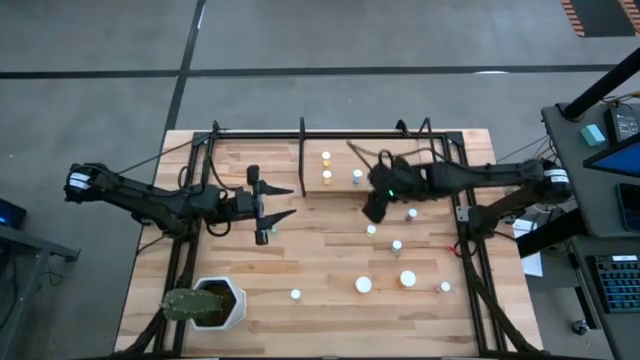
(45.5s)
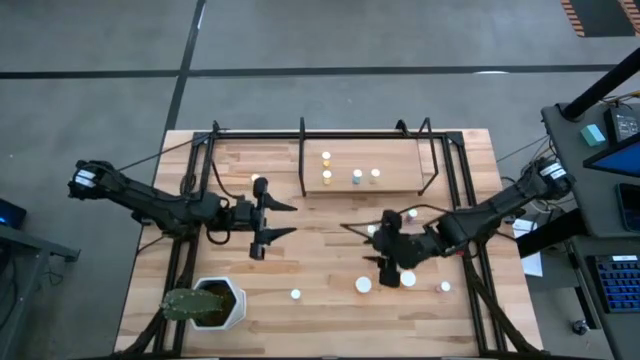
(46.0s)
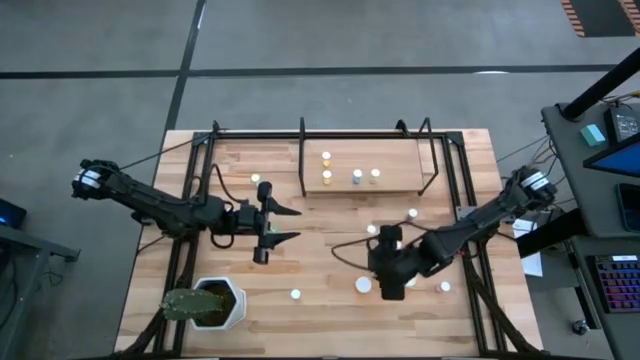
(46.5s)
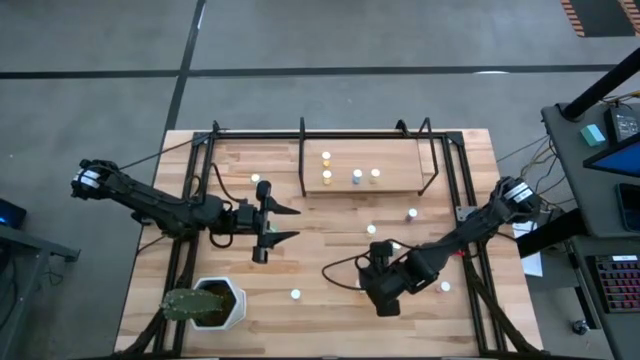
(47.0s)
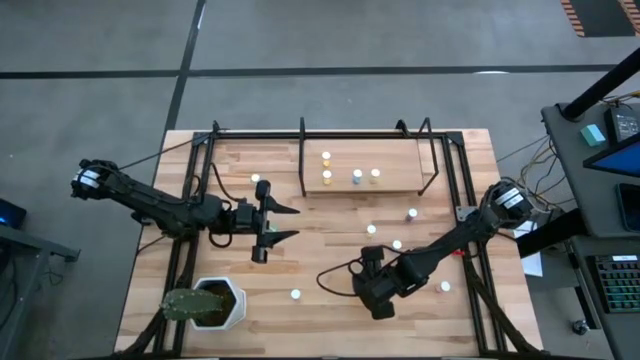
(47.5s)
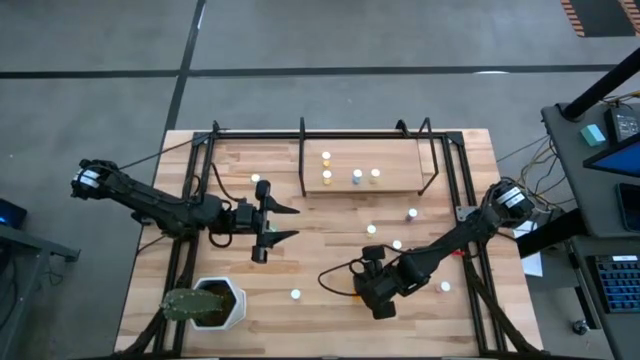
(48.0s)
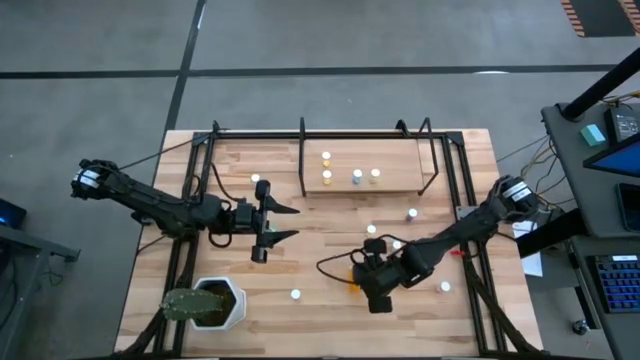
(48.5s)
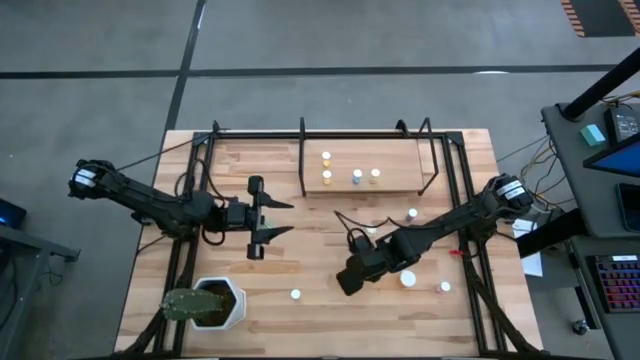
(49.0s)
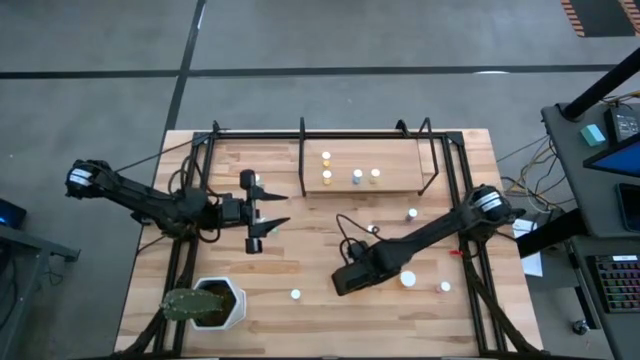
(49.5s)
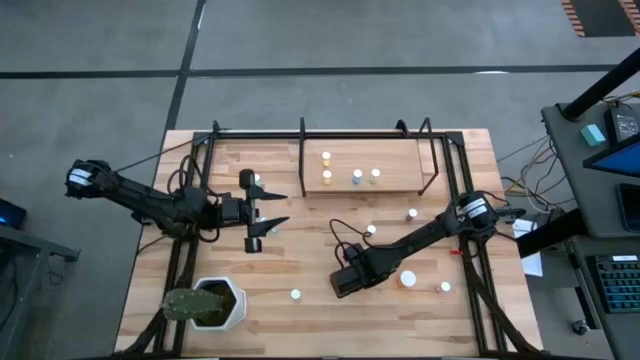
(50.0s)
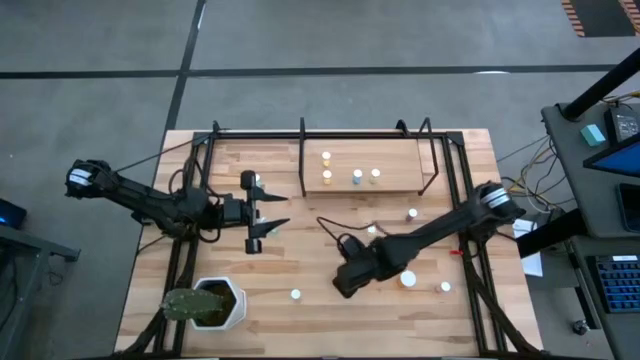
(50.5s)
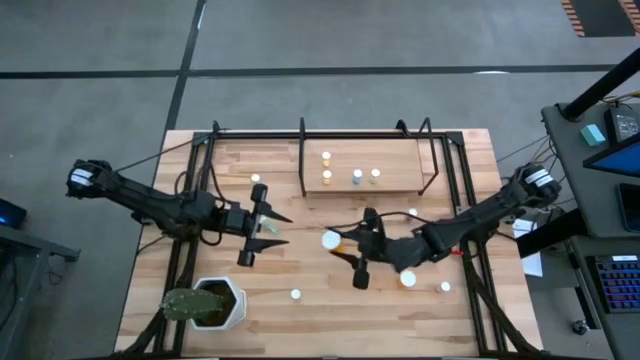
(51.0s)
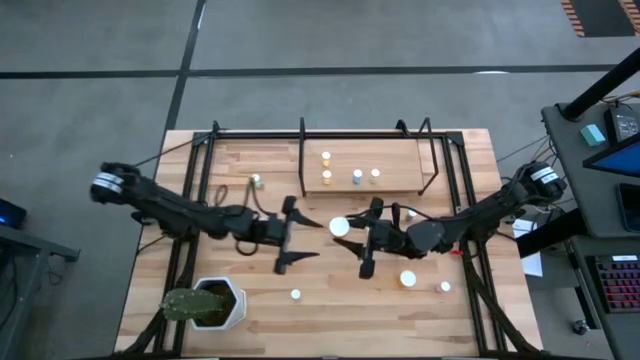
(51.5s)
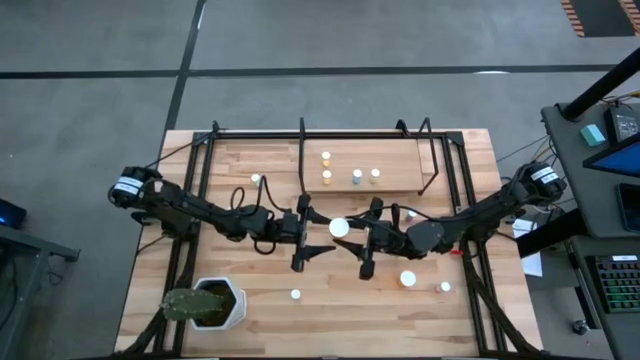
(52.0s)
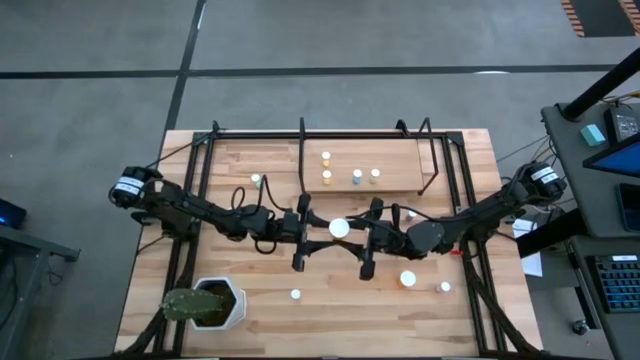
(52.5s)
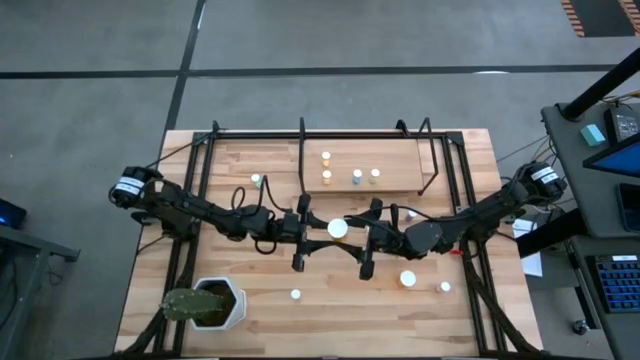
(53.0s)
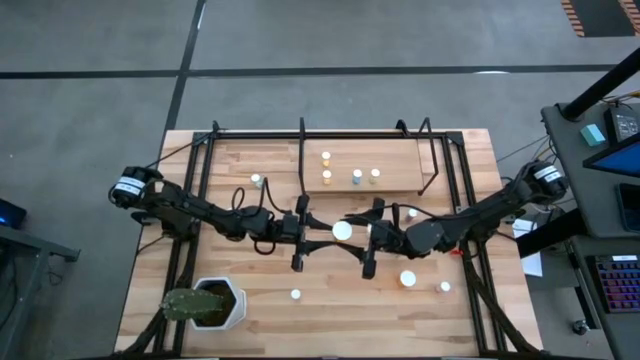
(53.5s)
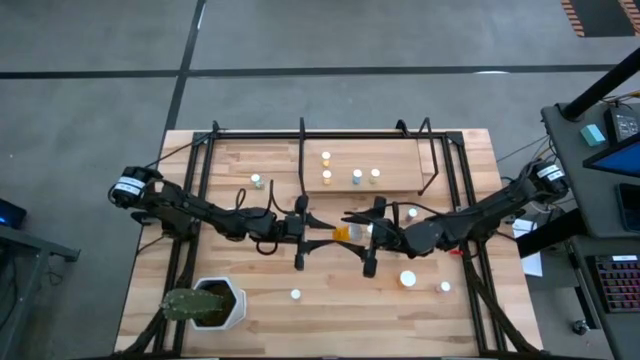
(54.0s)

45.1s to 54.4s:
Task: Pick and place medicine bottles onto shelf by color
Put the orange pill bottle on the shelf

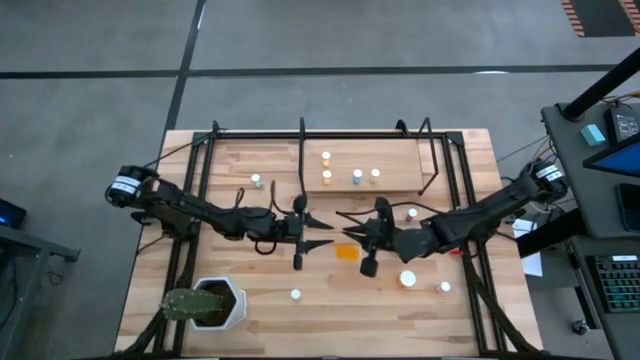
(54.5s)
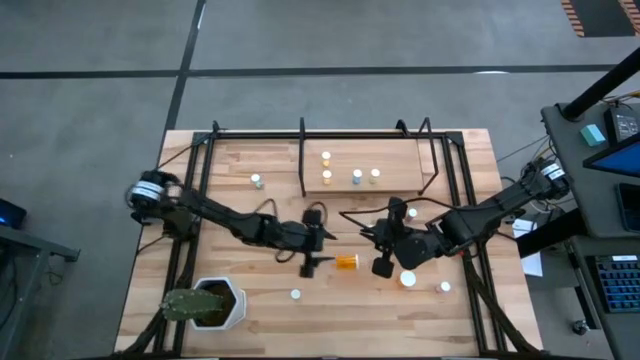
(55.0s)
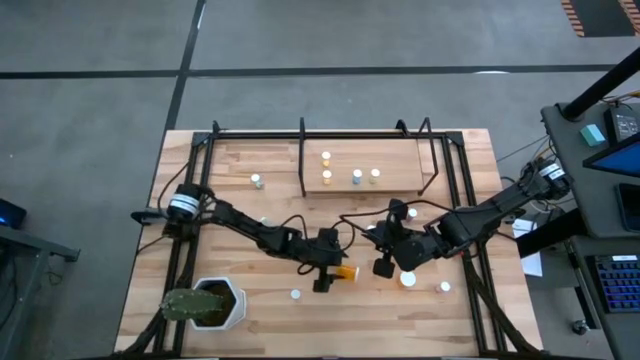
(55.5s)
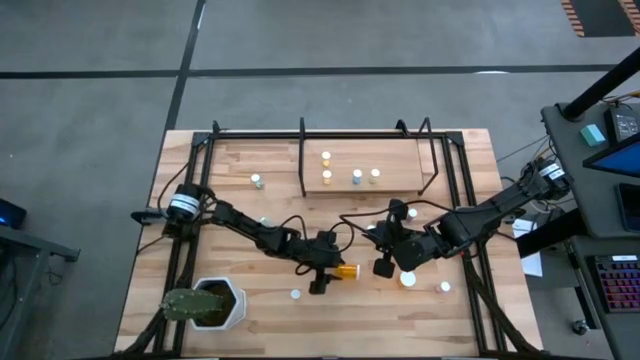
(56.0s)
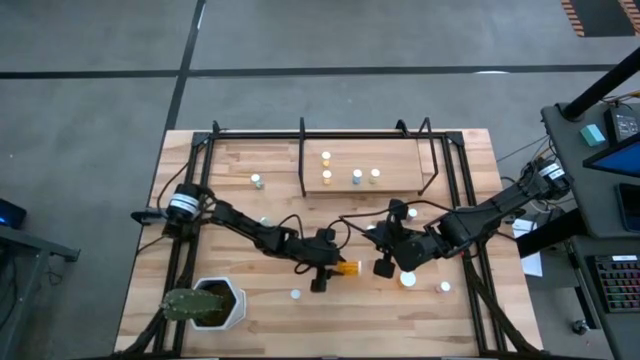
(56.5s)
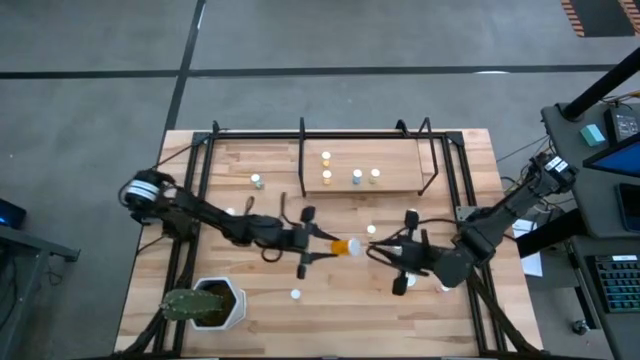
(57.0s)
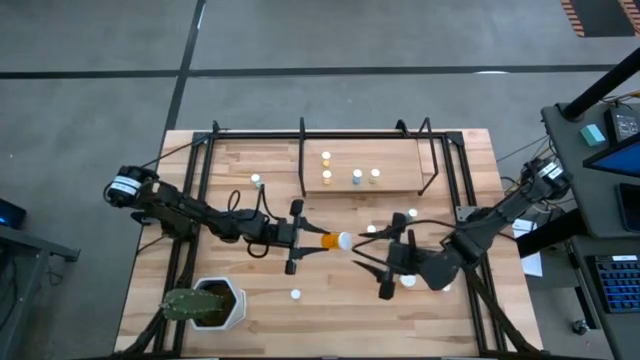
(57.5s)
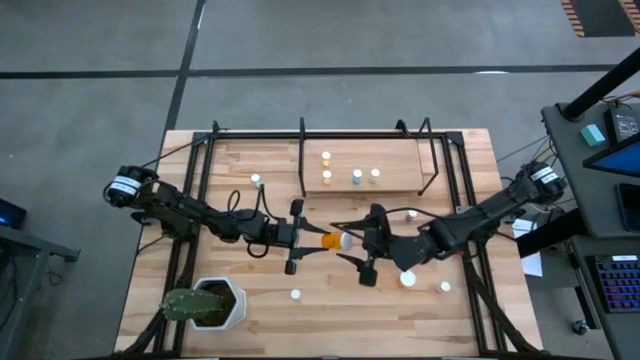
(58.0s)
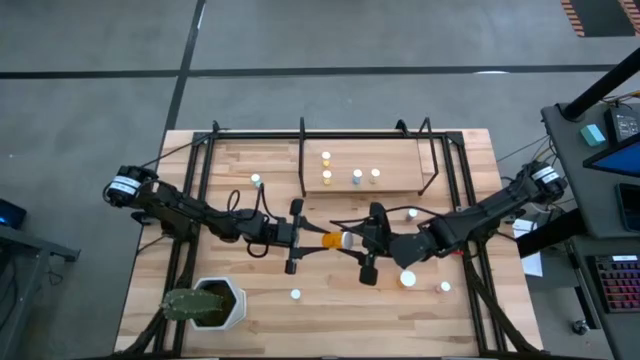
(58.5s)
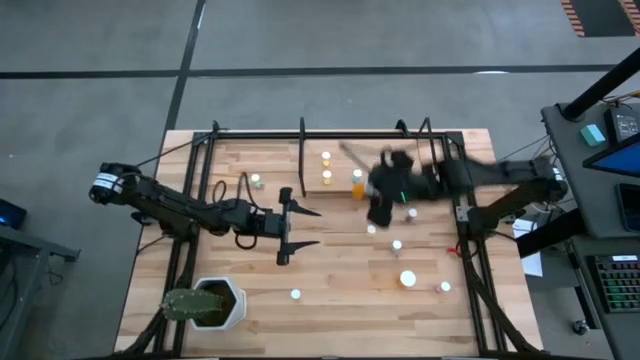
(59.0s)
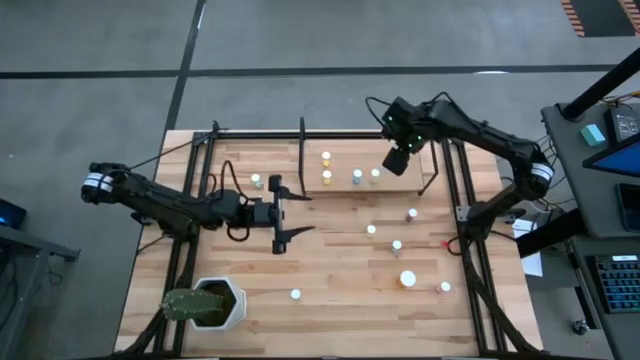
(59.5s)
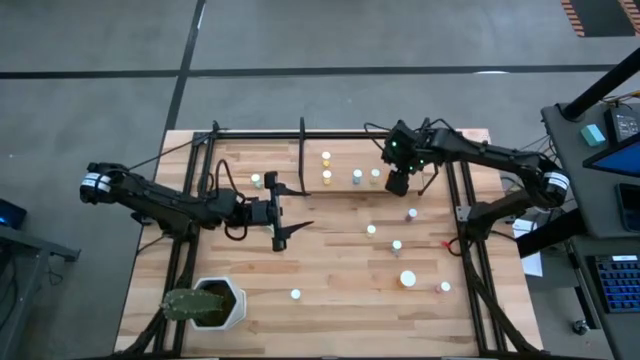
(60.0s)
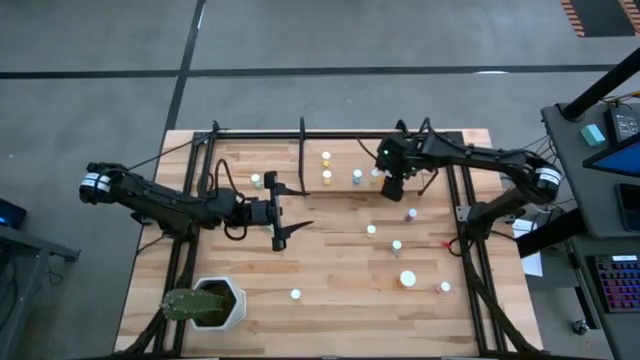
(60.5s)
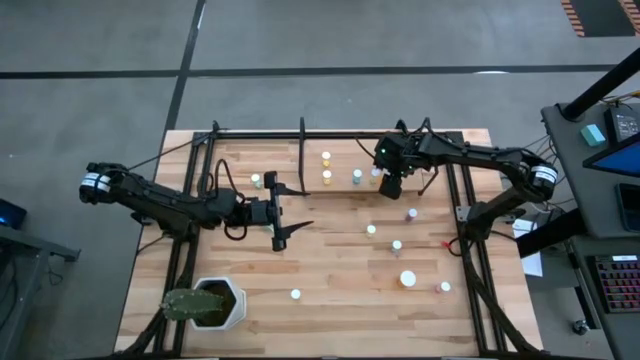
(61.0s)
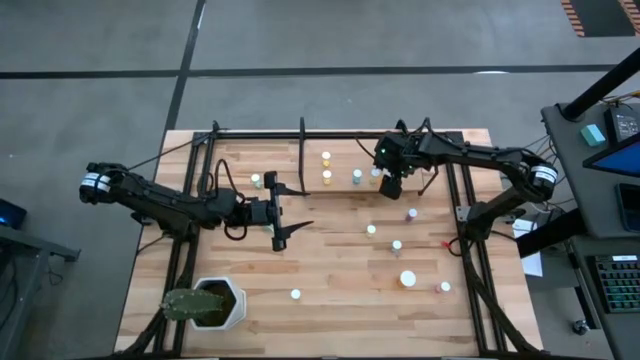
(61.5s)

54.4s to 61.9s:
Put the orange pill bottle on the shelf

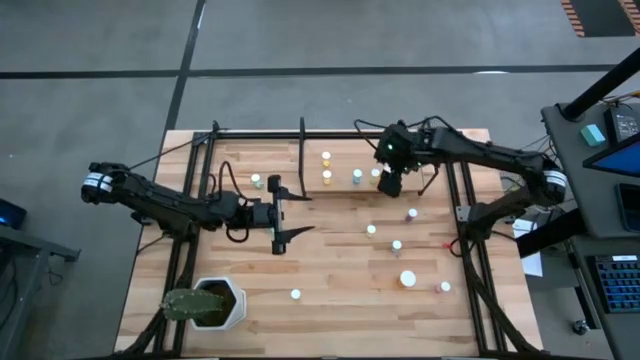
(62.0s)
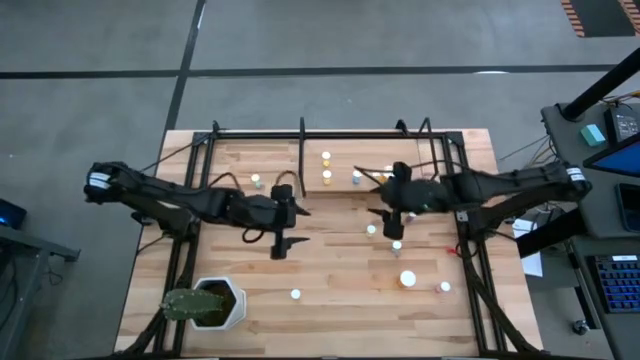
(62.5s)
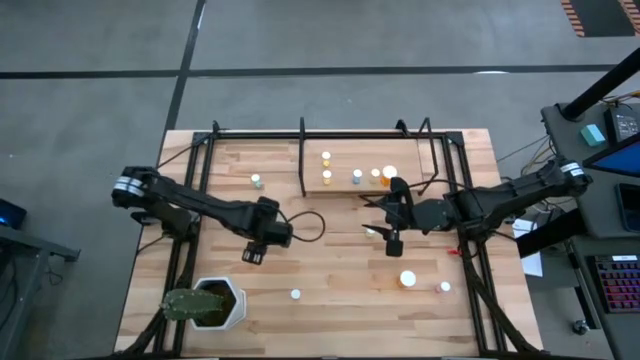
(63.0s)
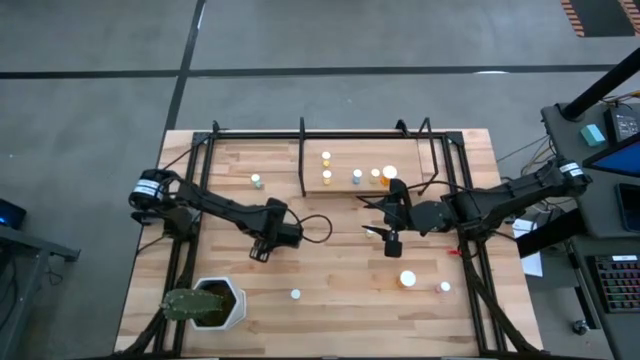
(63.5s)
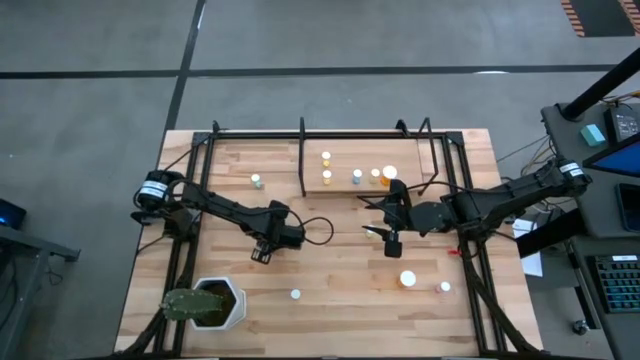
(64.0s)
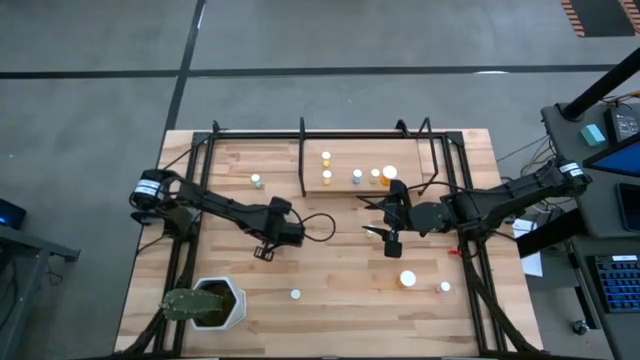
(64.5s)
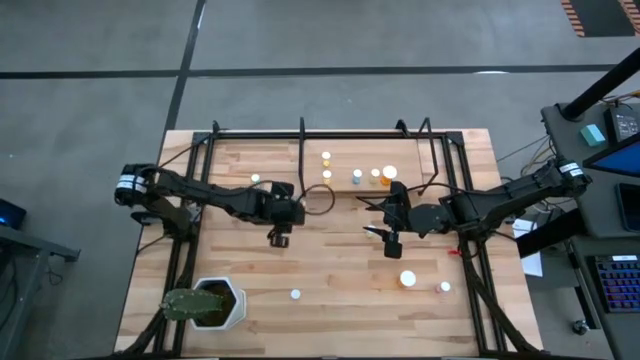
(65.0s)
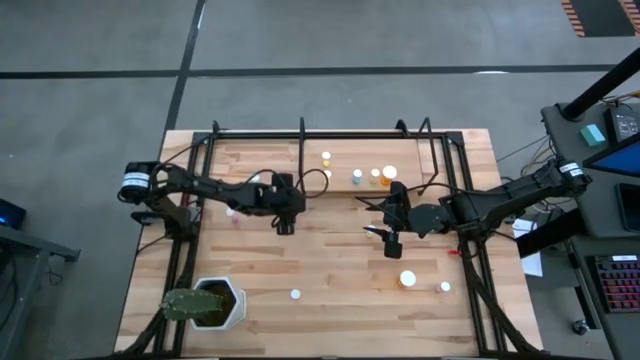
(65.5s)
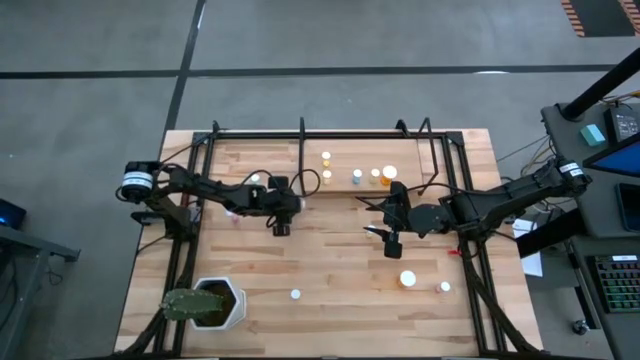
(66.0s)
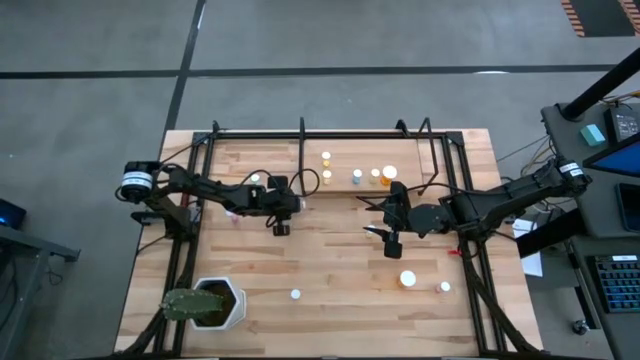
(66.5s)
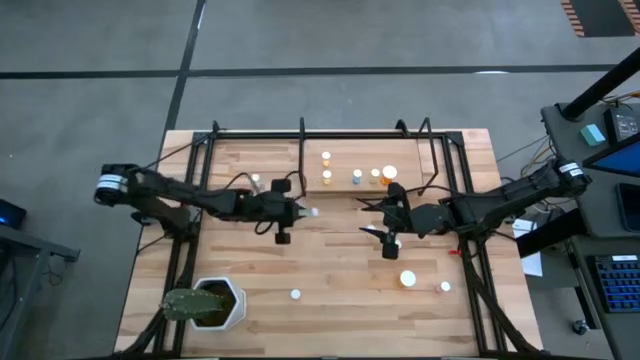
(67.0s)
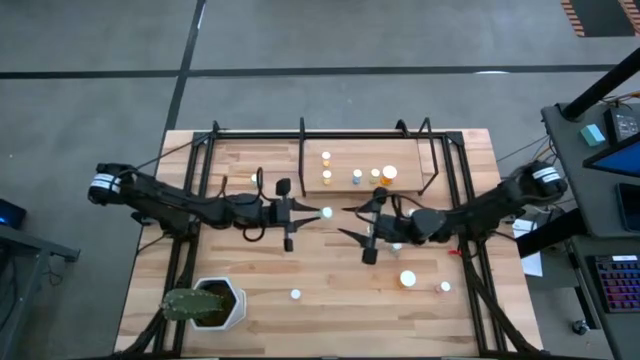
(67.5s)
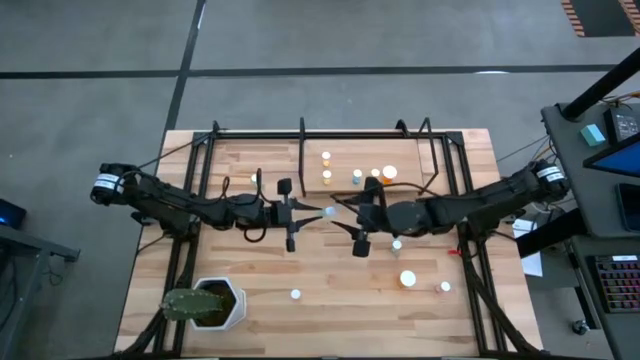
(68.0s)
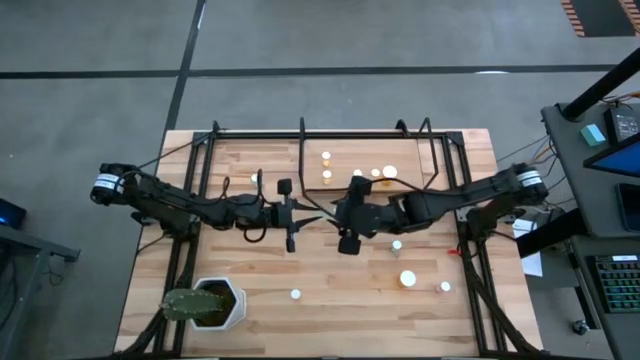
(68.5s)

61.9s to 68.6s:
Put the green pill bottle on the shelf
